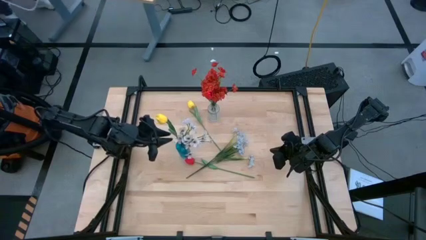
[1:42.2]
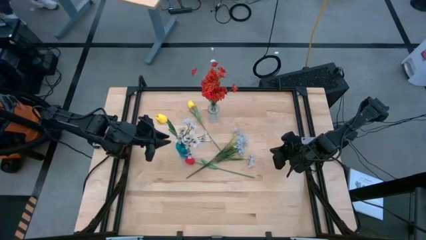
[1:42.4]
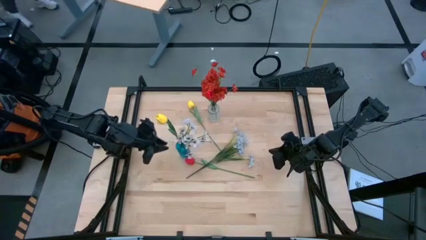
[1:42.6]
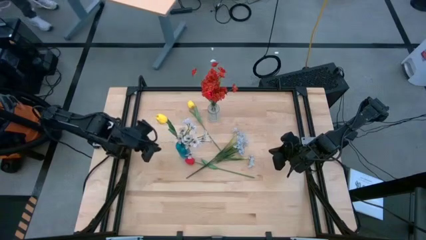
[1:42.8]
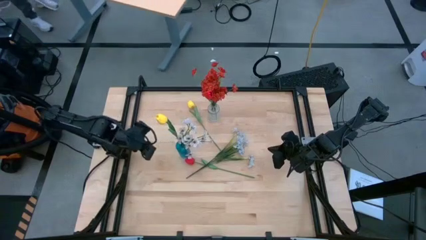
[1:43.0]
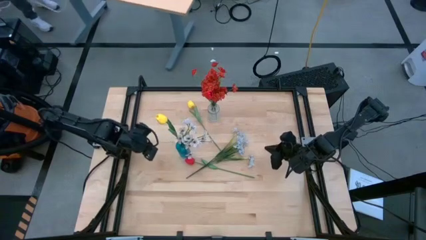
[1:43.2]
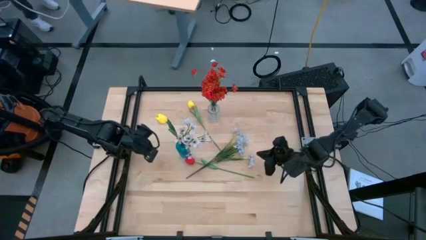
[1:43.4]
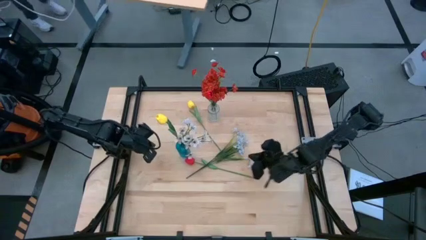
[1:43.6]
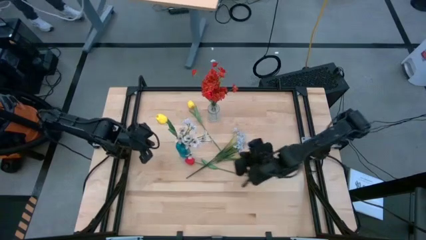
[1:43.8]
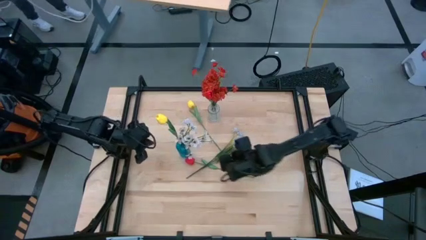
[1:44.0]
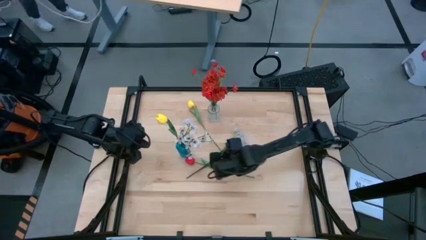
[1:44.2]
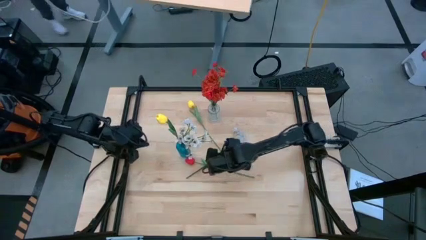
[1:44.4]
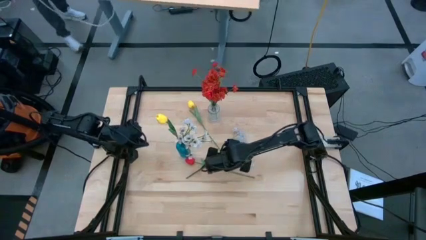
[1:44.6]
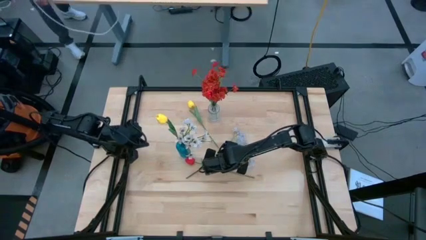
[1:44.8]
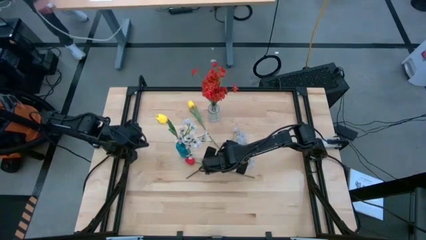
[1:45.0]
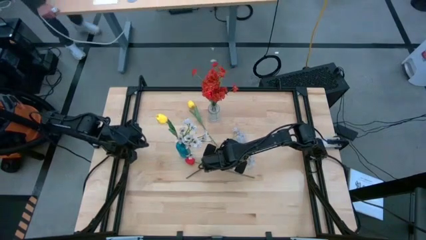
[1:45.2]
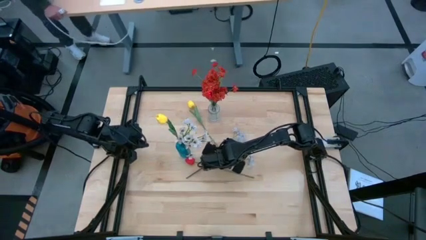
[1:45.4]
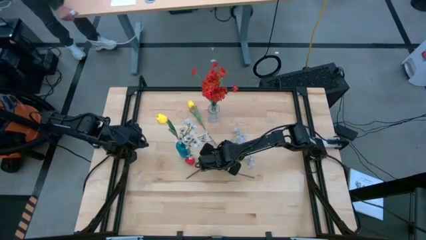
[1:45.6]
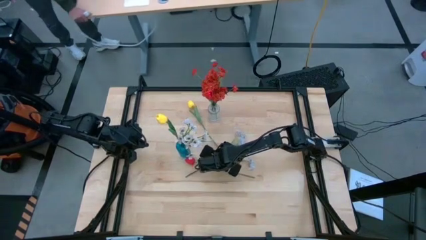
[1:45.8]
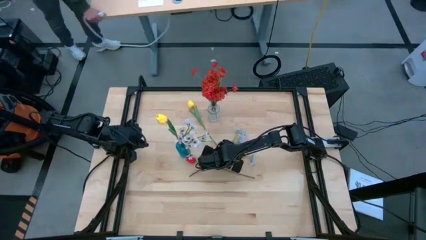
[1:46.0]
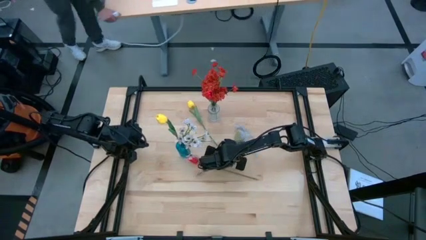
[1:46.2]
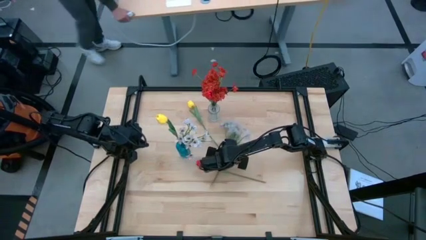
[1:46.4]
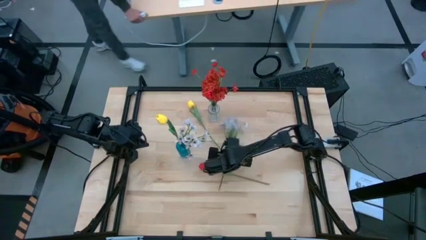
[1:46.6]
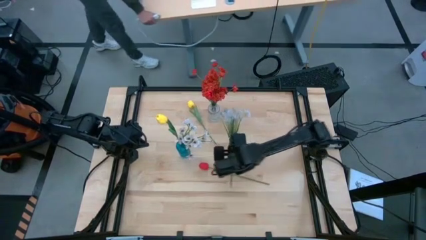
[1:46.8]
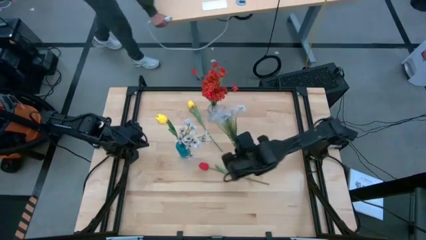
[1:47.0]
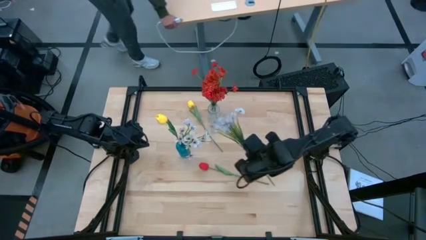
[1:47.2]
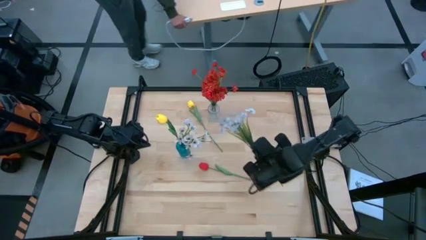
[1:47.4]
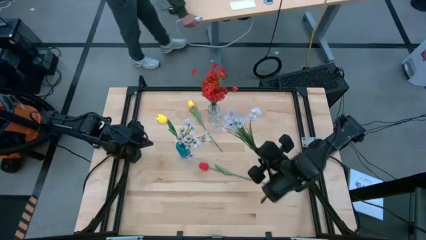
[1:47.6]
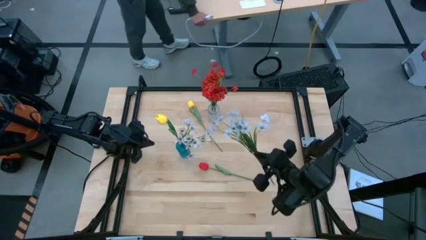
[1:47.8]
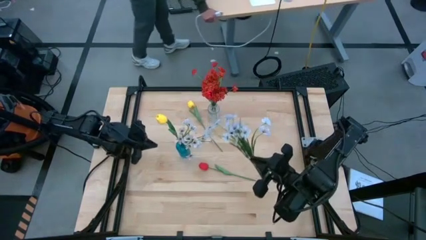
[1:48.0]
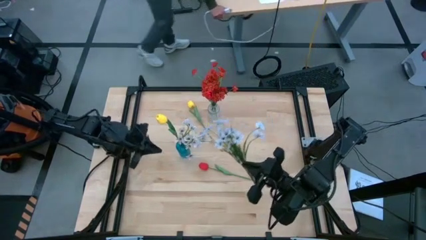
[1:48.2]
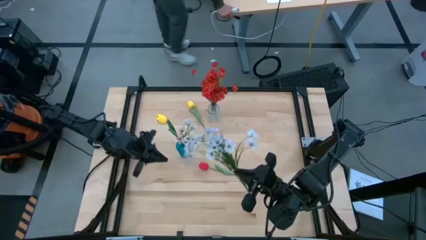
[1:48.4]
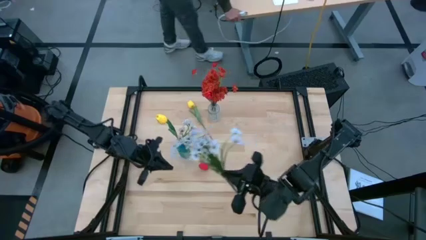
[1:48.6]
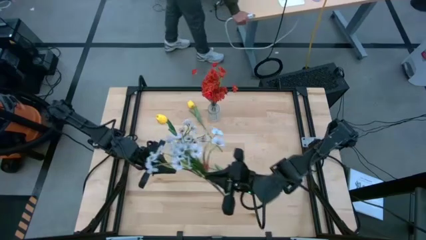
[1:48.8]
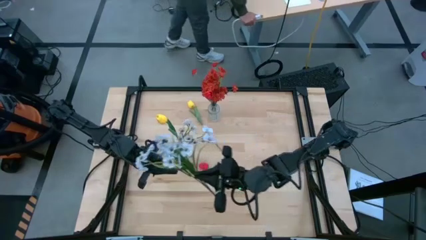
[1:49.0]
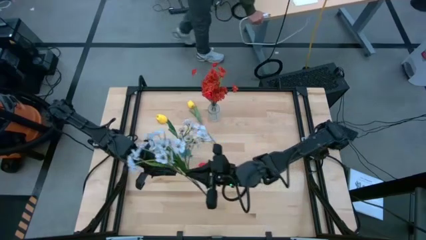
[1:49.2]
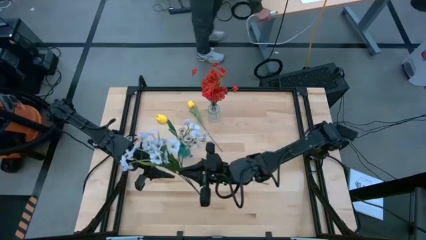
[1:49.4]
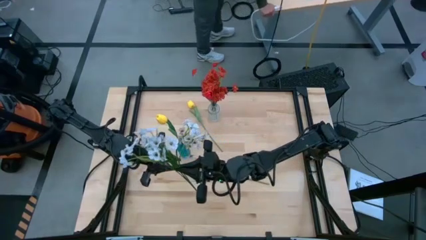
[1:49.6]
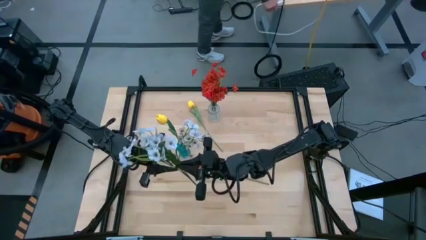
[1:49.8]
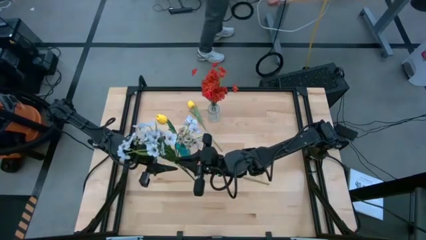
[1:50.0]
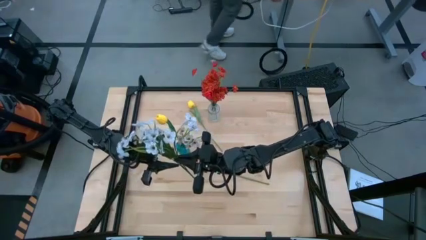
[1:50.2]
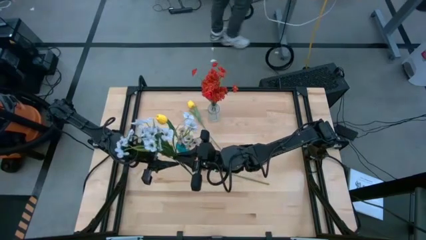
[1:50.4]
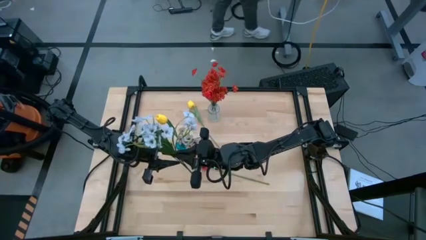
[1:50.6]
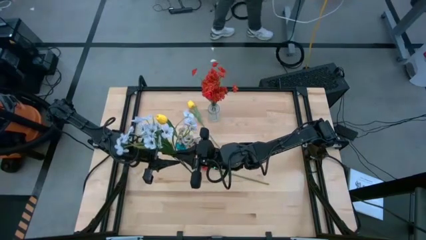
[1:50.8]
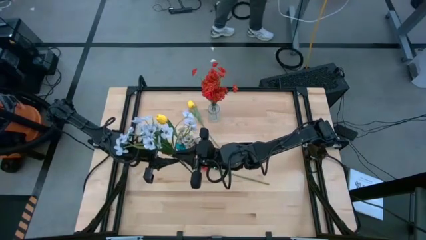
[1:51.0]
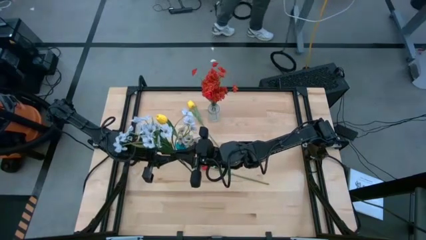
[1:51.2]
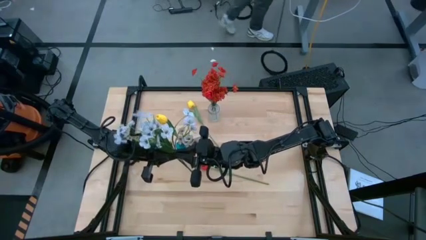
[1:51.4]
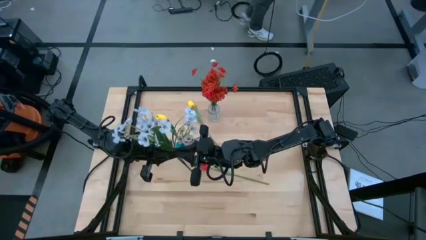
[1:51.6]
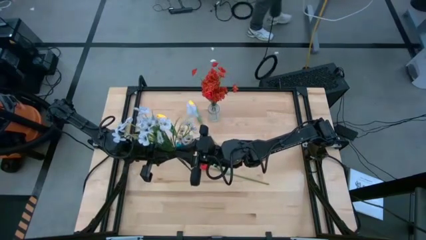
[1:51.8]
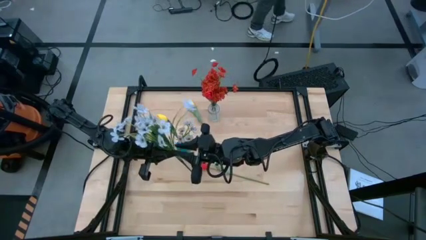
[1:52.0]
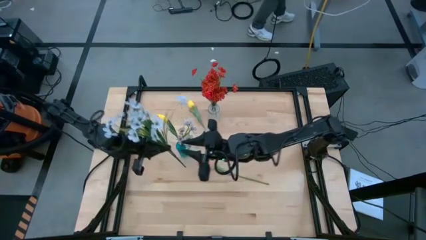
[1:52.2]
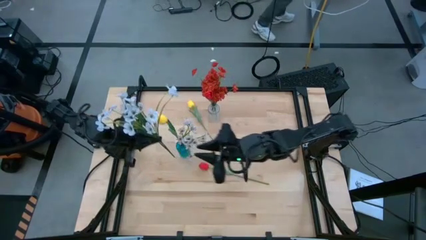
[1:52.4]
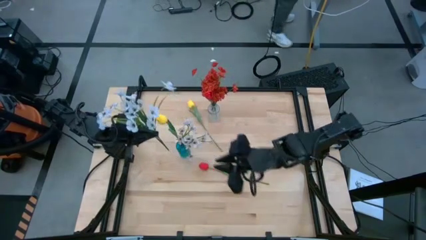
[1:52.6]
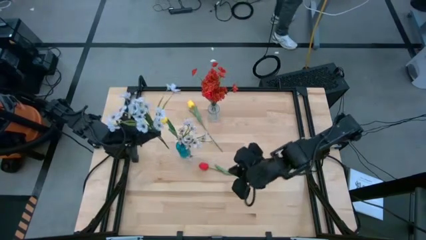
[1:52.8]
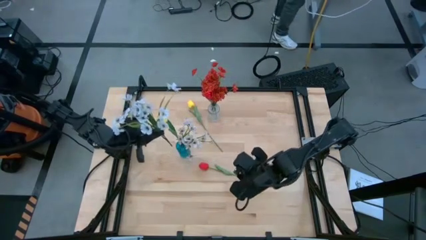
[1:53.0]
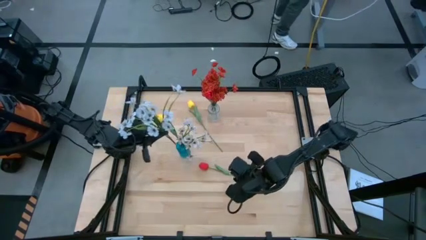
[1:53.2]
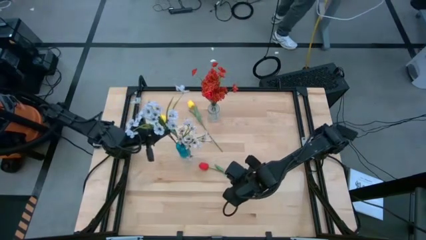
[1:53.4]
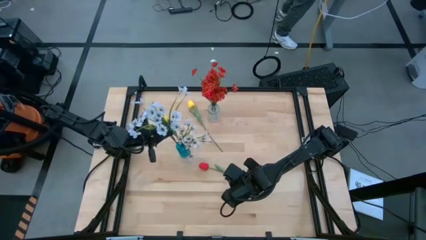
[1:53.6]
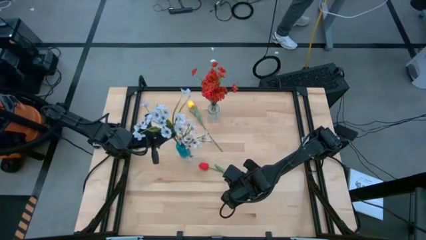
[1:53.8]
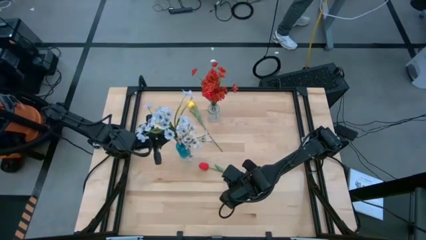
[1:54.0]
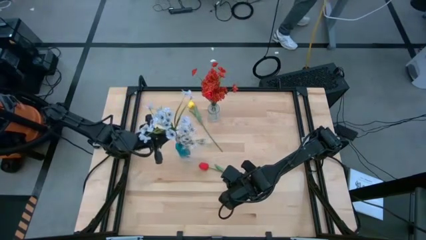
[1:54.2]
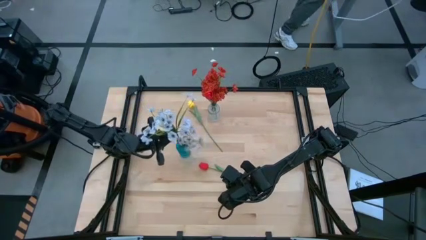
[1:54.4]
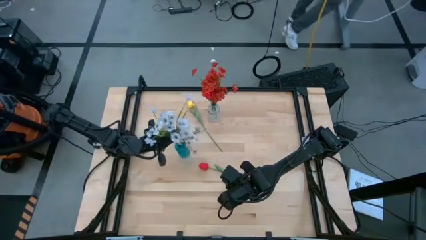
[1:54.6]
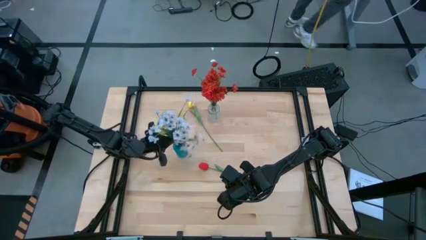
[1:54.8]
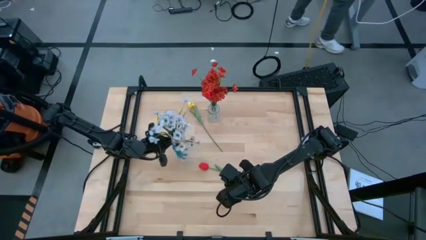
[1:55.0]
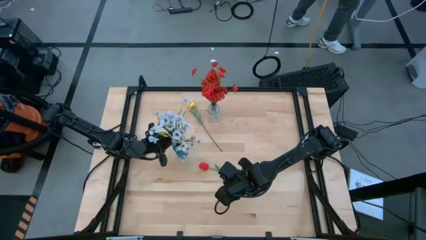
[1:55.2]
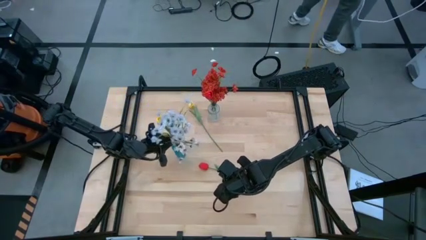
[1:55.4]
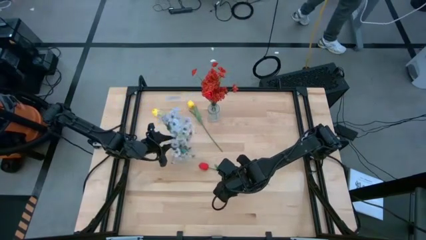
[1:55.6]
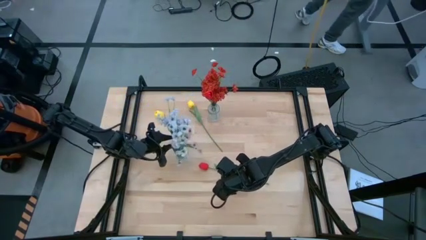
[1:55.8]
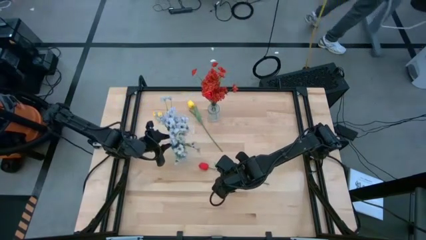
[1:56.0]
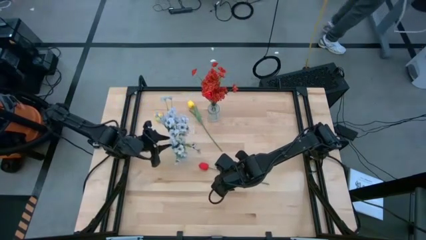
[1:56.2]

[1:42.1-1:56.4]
Task: Sort flowers into vase by color
Put the white flowers into the blue vase
